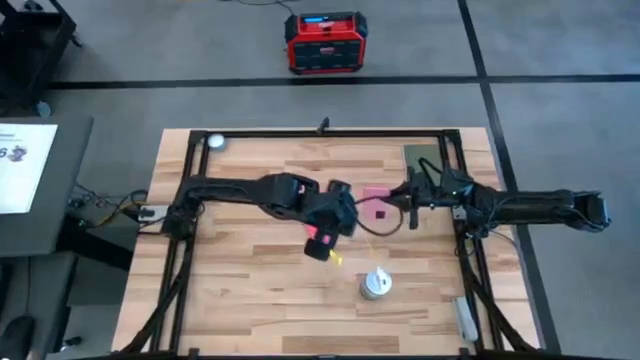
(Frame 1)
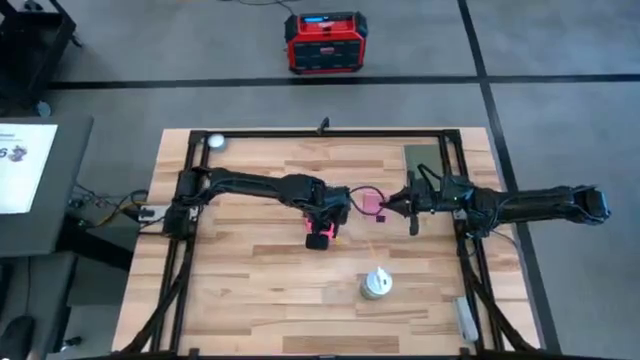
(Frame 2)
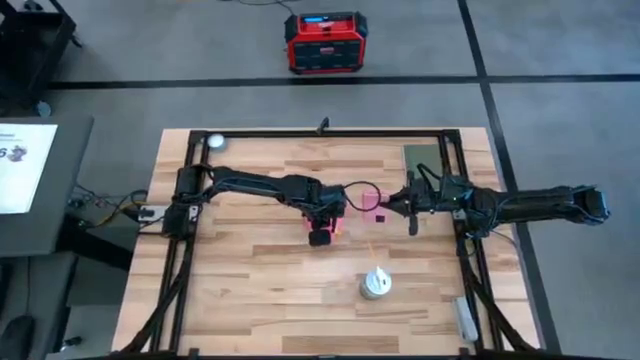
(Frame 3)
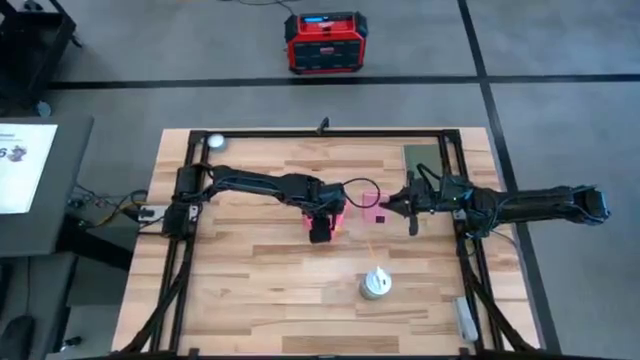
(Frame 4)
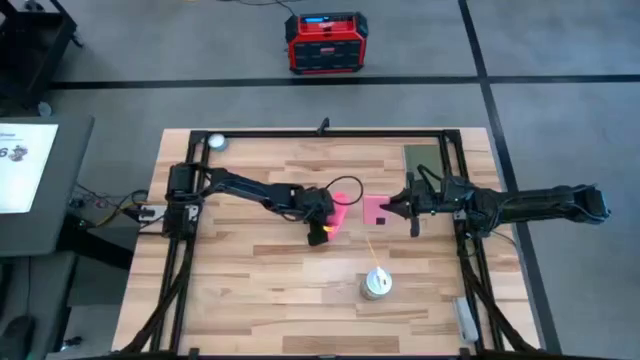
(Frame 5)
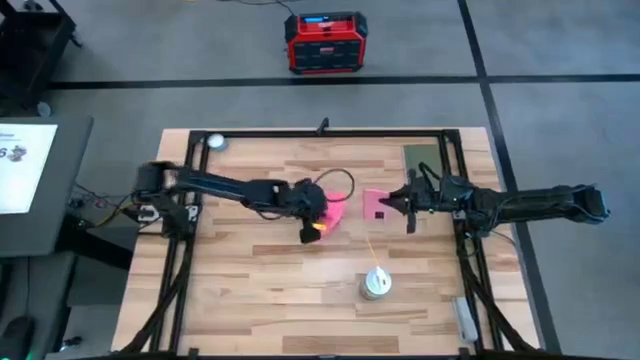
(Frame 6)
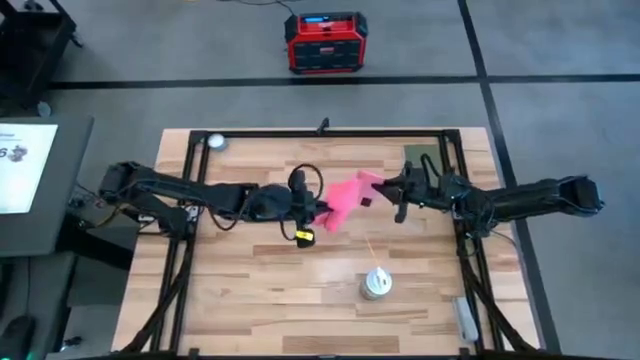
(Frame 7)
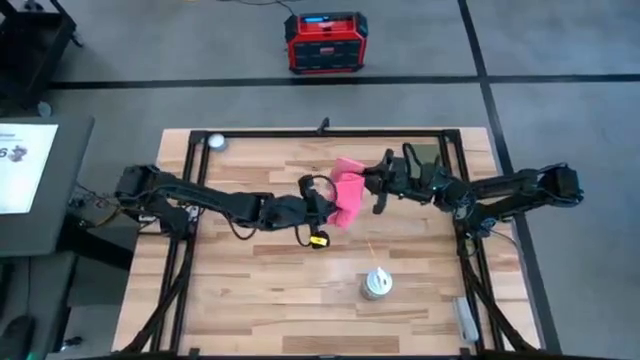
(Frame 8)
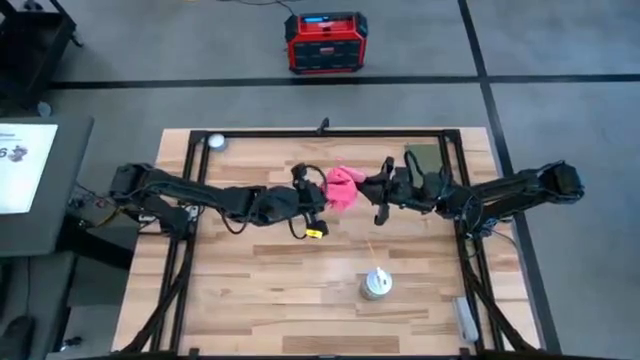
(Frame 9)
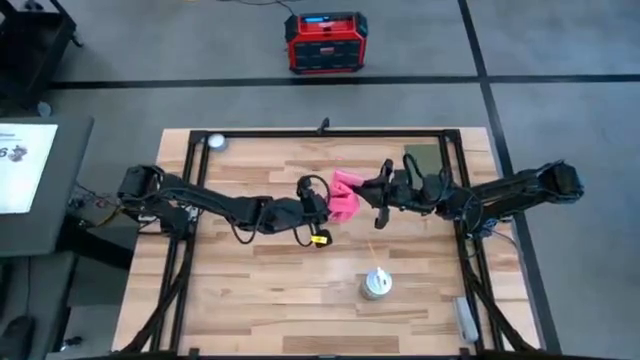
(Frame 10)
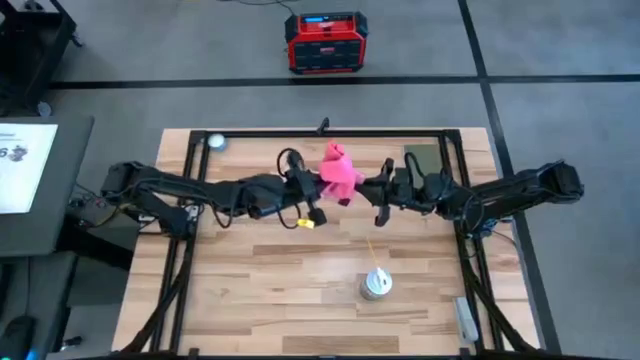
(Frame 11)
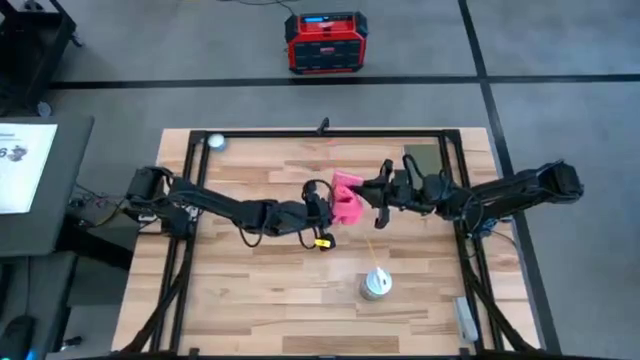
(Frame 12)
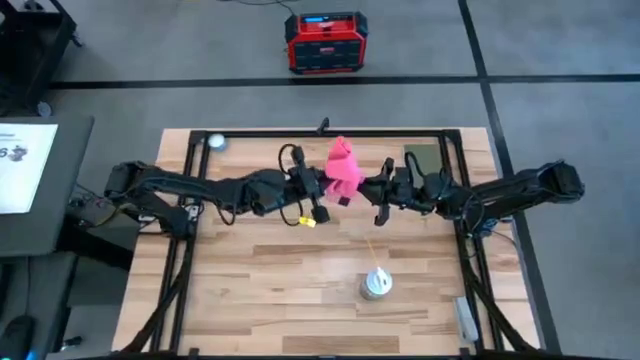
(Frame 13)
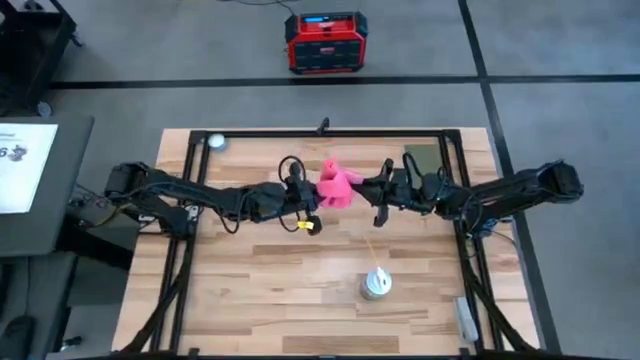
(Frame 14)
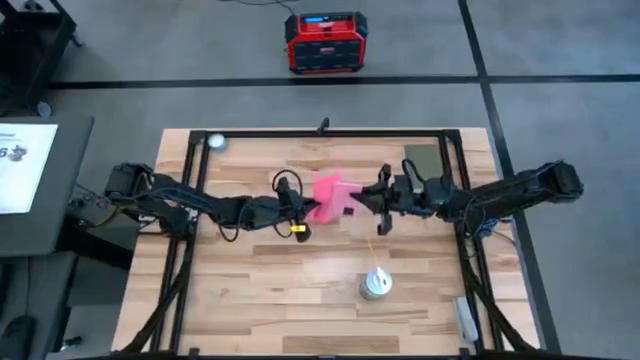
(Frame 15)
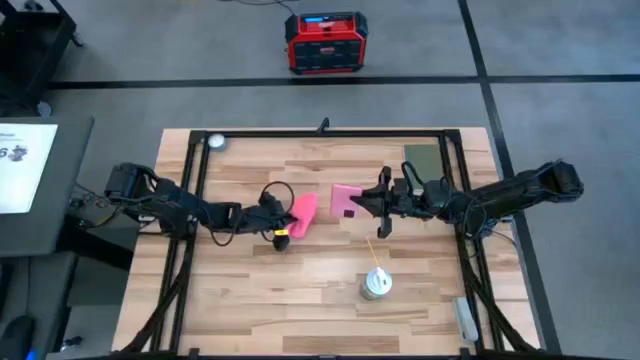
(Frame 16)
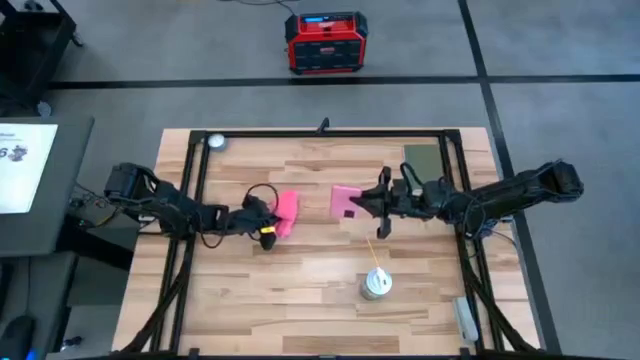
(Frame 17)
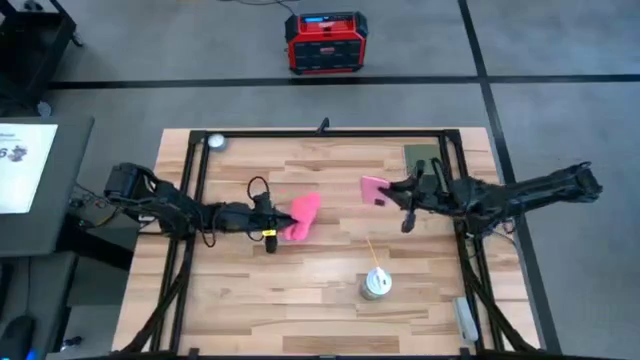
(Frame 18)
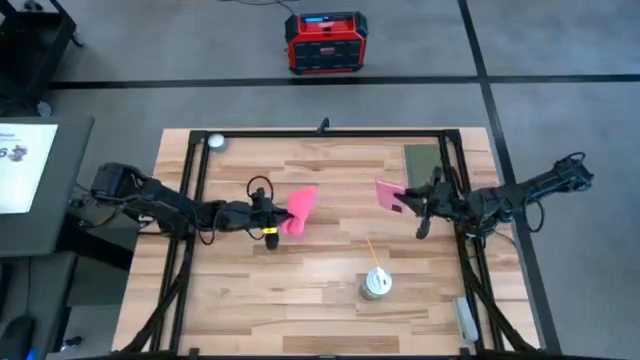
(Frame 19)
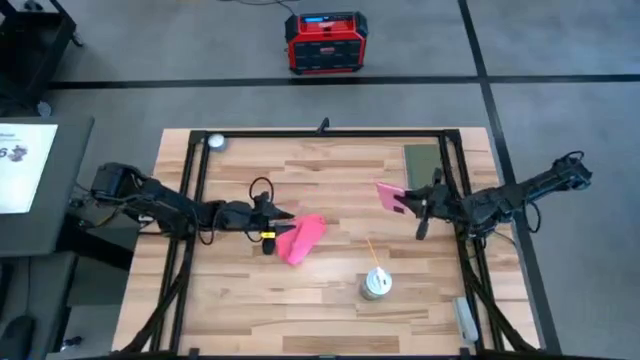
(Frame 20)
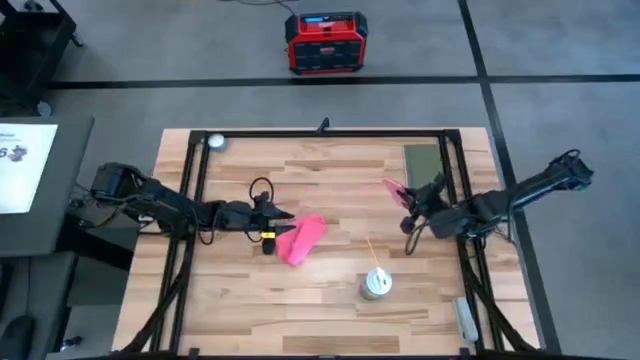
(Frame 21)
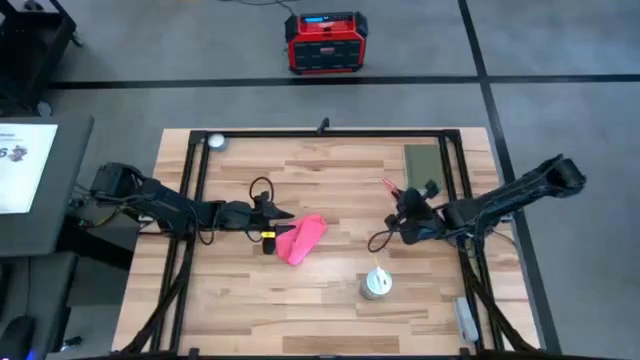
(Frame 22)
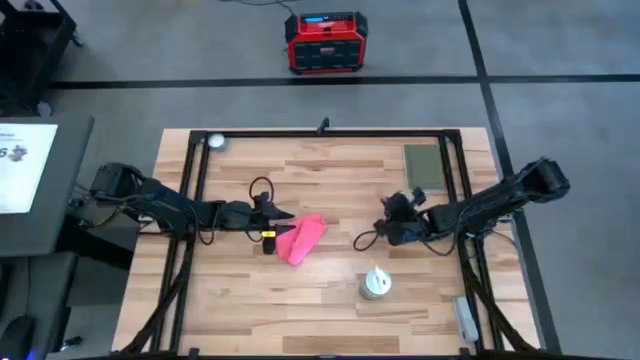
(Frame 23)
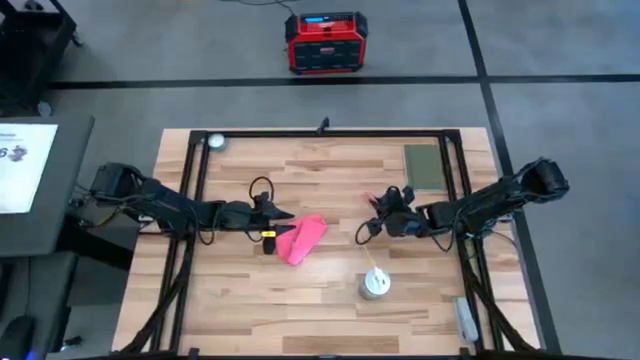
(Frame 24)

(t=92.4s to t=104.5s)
Task: Apply microfiber cloth
Wipe the back of the phone using the pink microfiber cloth

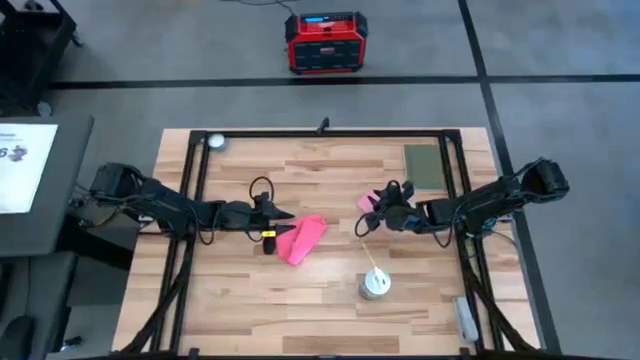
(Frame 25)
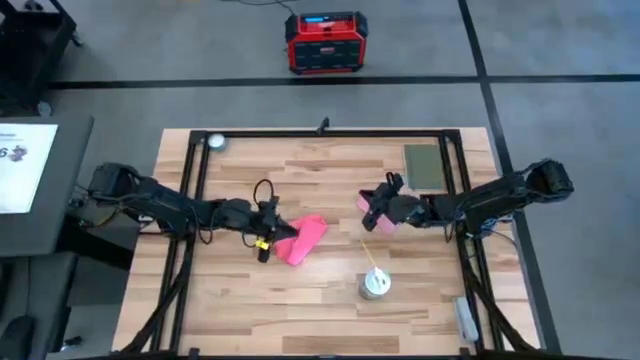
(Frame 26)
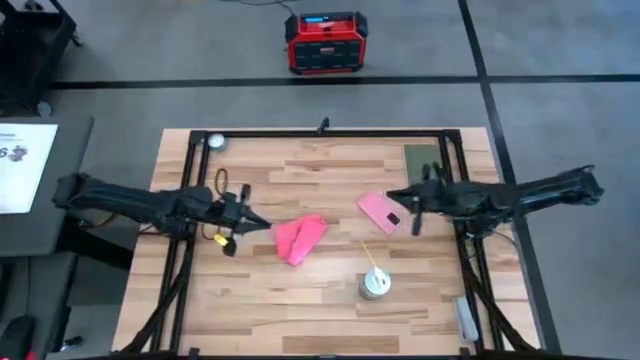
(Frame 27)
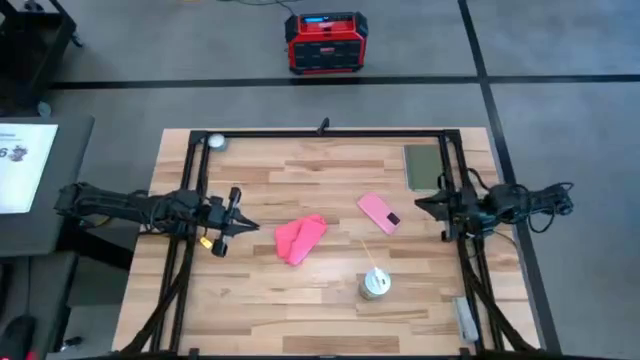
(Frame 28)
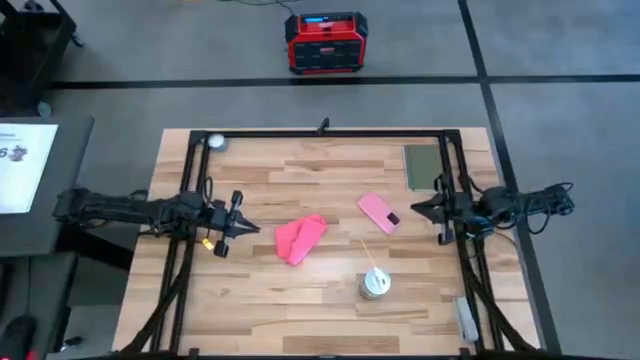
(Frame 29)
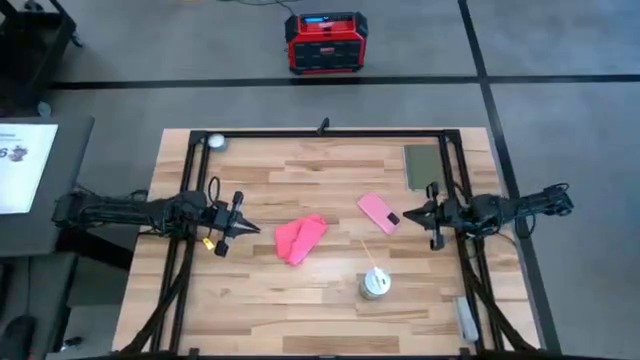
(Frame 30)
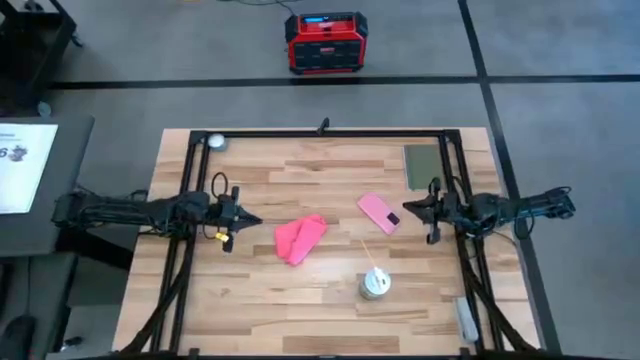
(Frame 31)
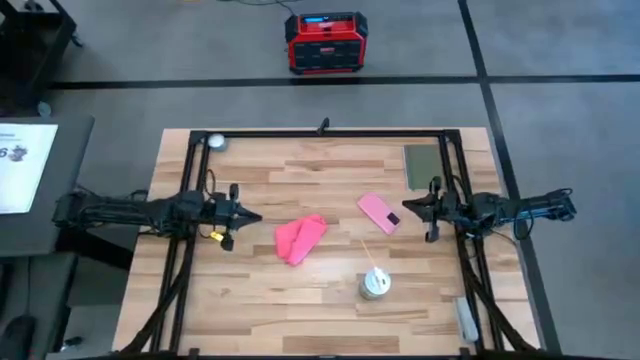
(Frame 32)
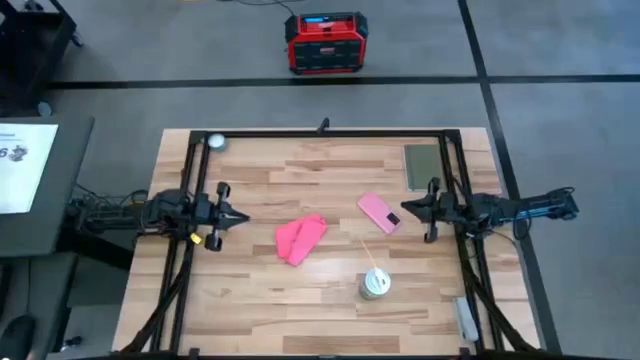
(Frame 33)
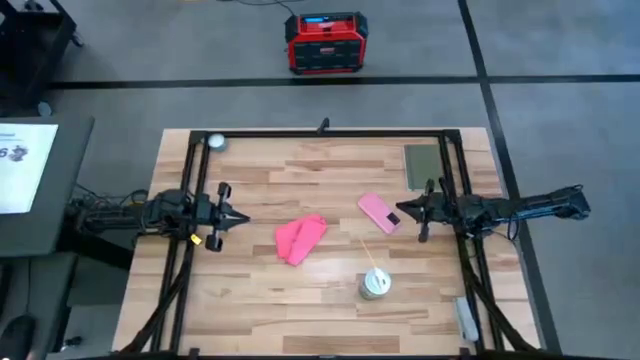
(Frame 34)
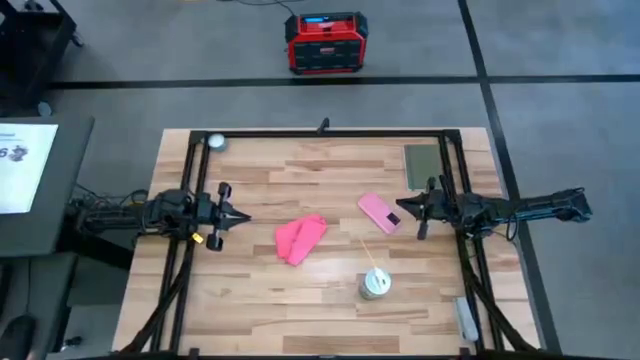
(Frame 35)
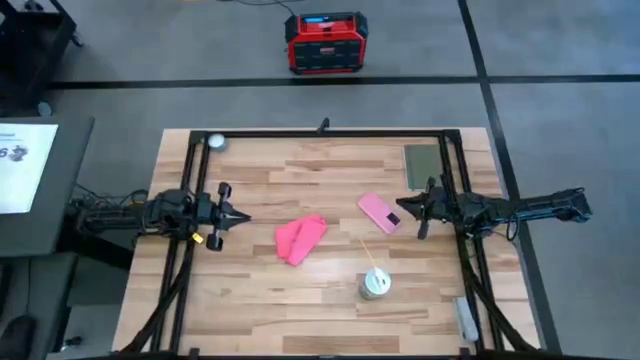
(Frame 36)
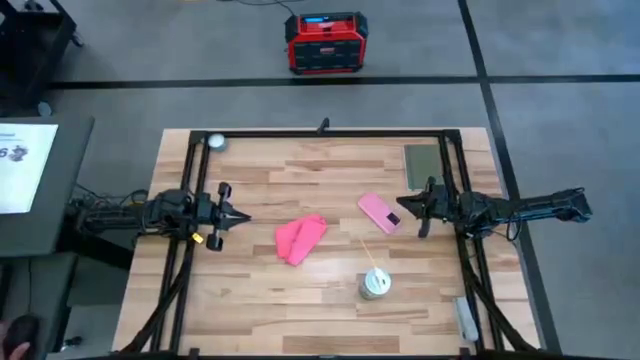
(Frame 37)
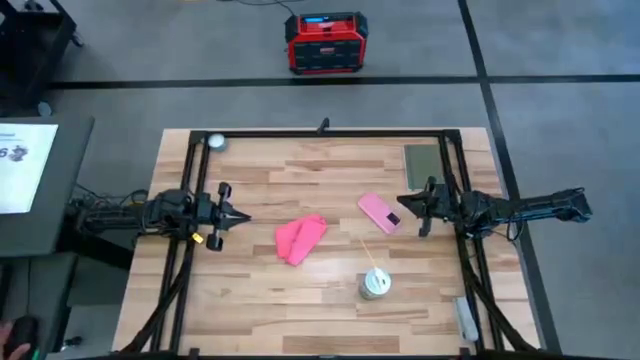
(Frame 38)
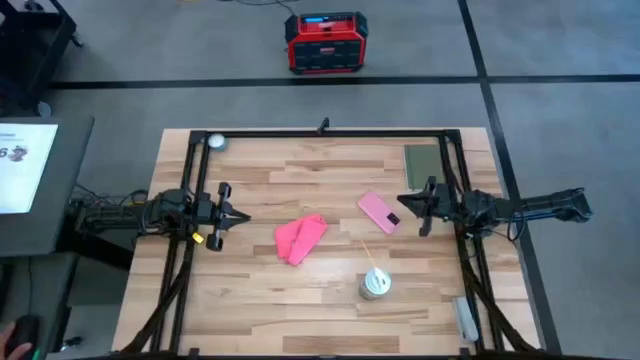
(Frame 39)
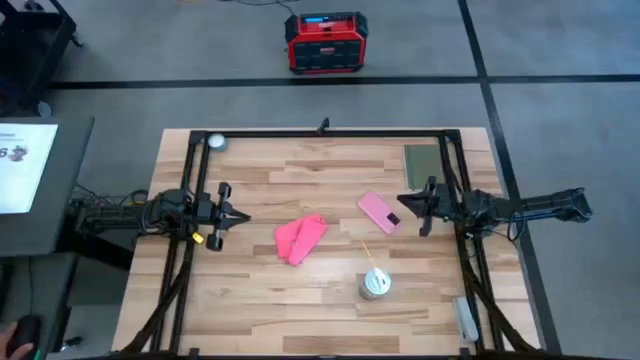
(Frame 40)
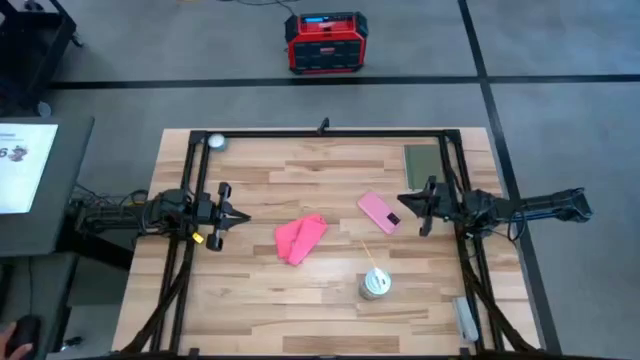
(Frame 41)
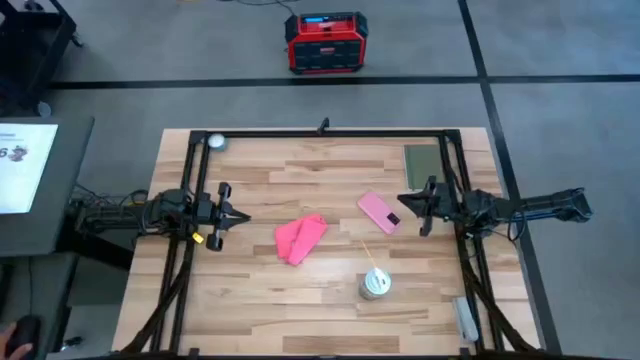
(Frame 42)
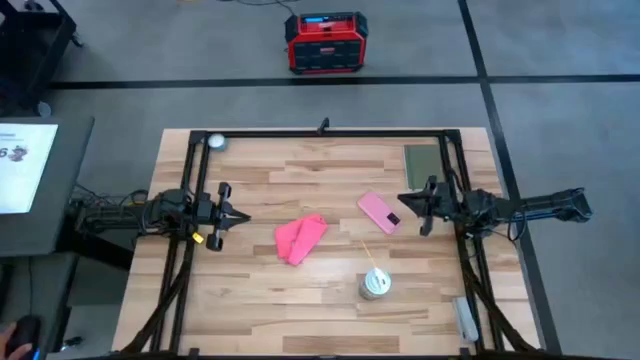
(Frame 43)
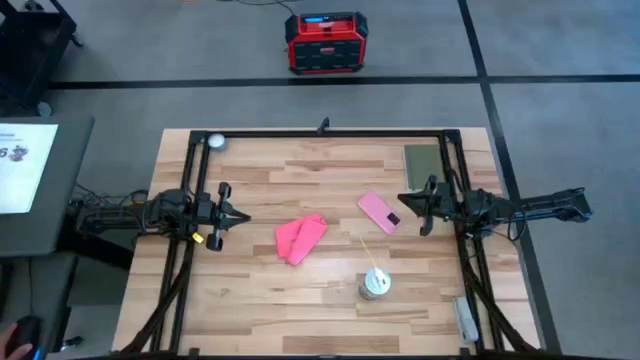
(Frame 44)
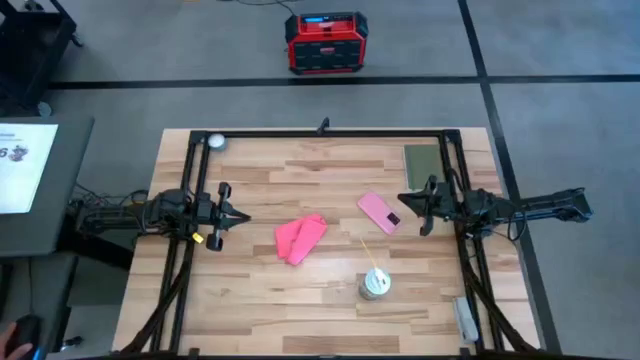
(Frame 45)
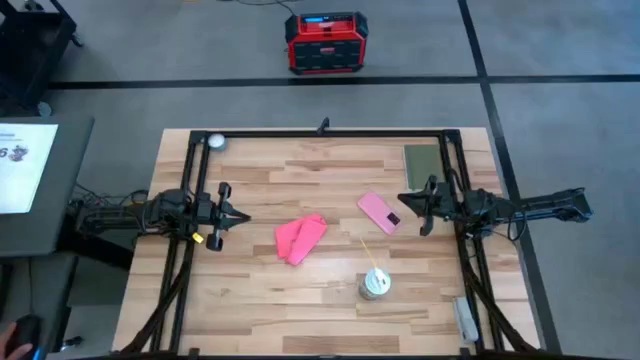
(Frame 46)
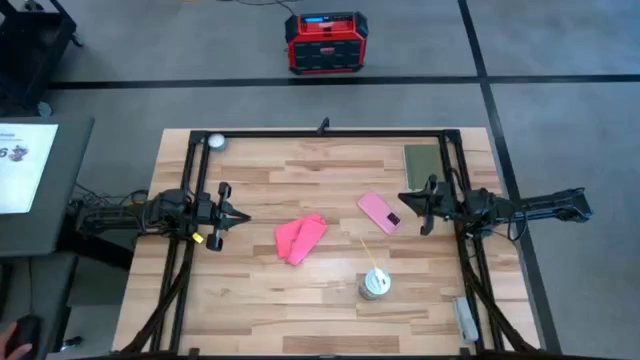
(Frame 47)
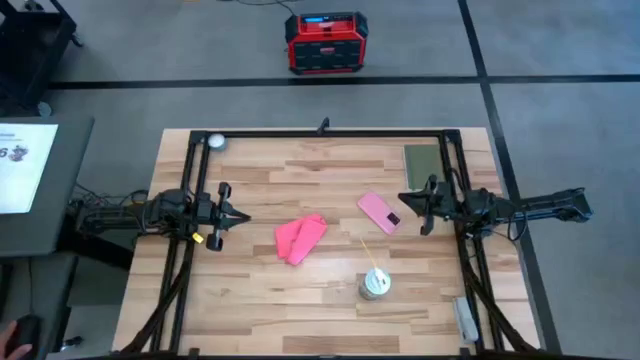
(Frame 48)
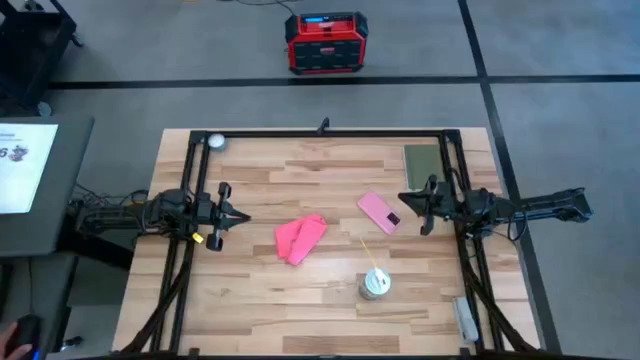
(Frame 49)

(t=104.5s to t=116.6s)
Return to Home Position
